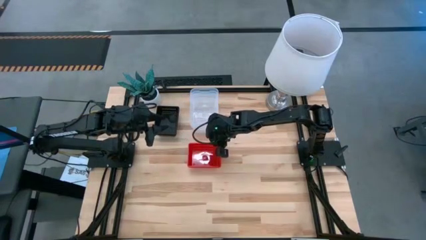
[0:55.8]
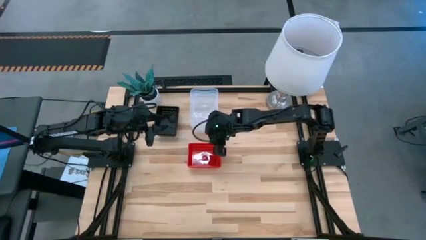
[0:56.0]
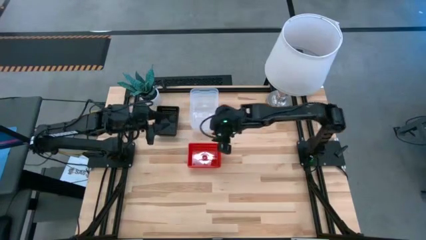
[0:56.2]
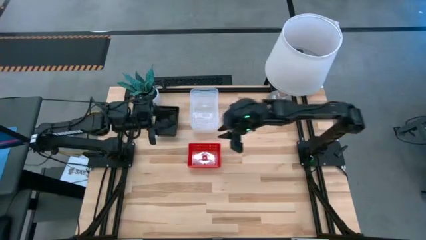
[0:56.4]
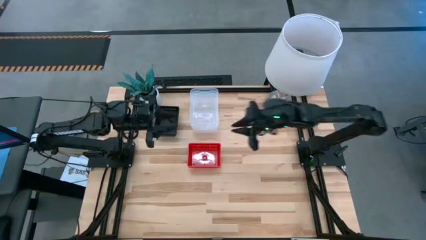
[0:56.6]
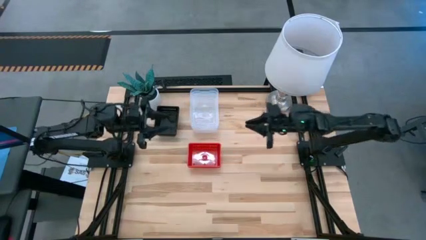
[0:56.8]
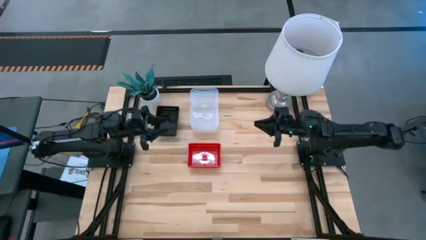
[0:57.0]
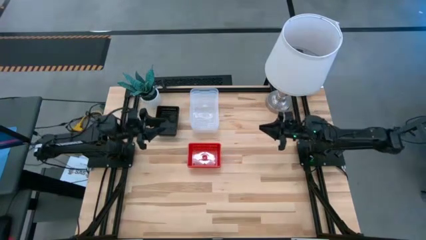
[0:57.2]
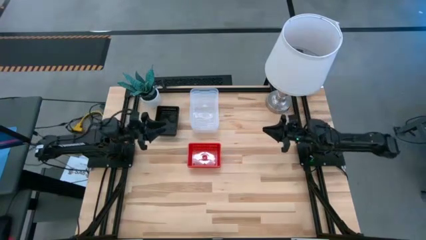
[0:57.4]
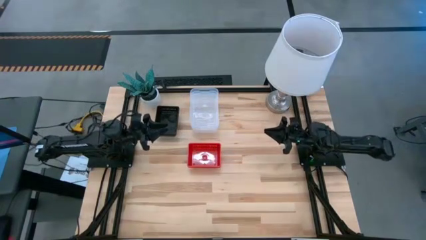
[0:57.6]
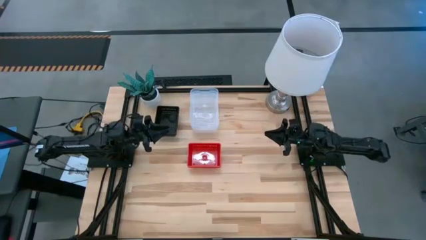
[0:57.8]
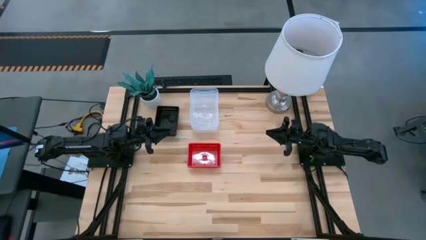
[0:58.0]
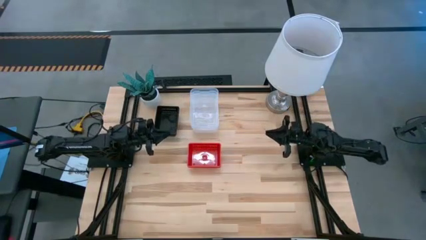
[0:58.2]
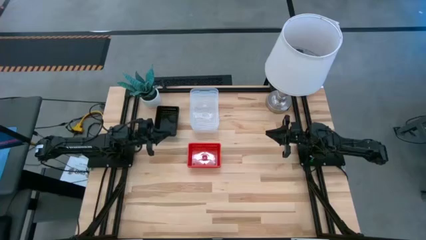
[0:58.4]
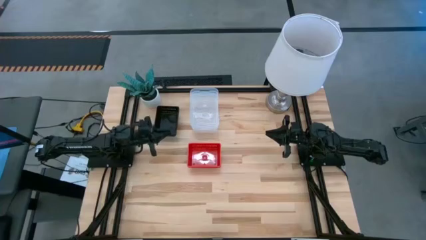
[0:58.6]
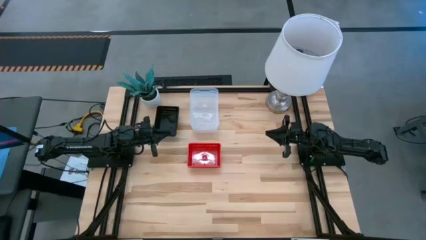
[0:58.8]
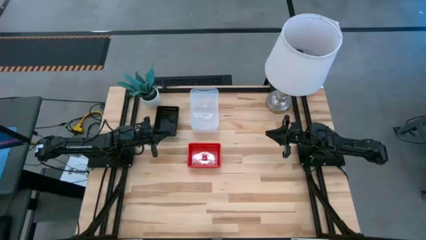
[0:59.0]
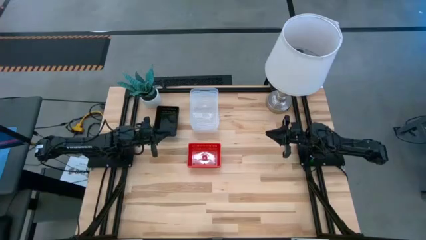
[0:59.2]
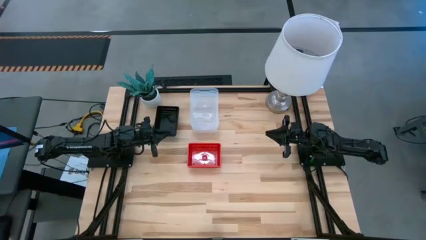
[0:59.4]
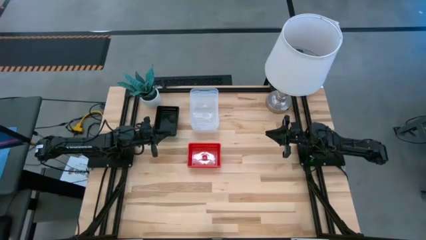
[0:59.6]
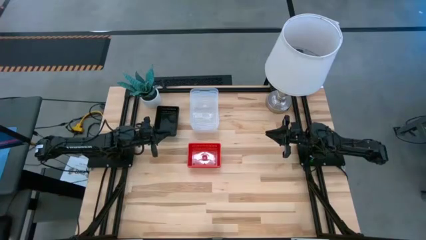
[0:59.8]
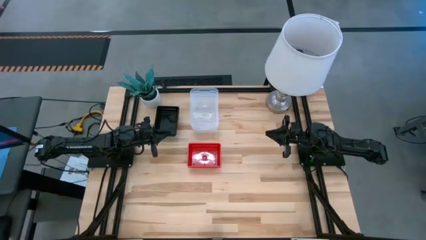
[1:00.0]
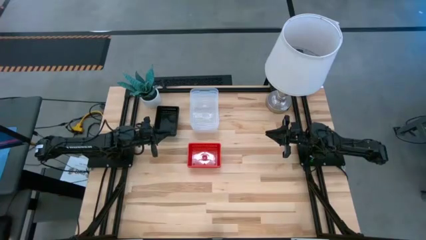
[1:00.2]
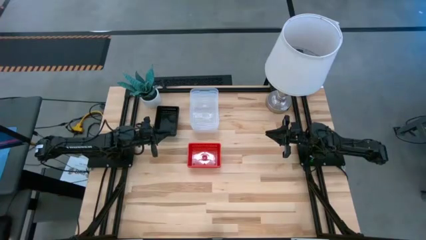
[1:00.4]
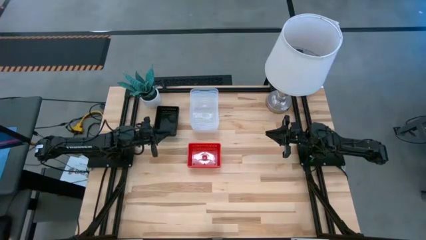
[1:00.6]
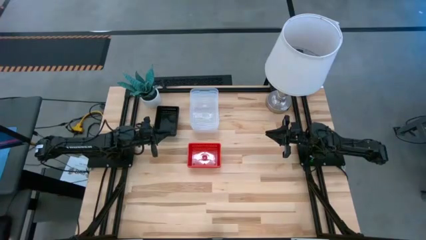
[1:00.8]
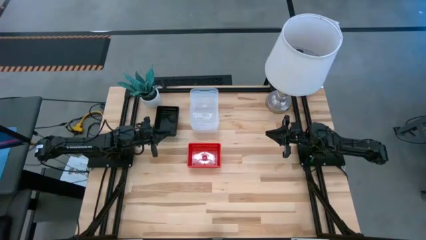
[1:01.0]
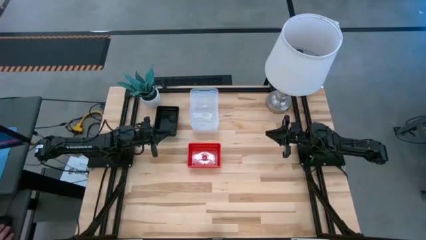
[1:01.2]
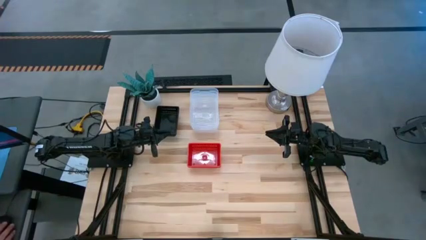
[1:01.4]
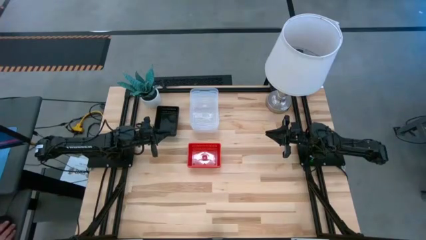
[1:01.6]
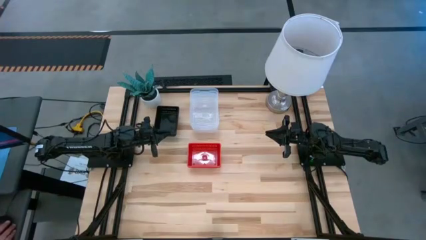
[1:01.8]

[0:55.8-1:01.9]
Return to Home Position
